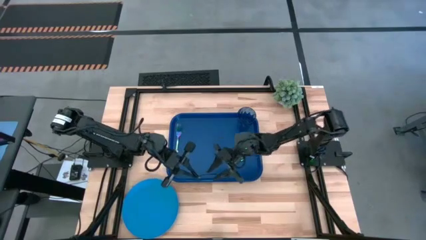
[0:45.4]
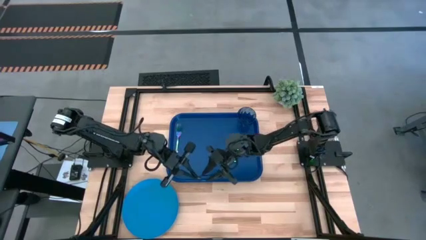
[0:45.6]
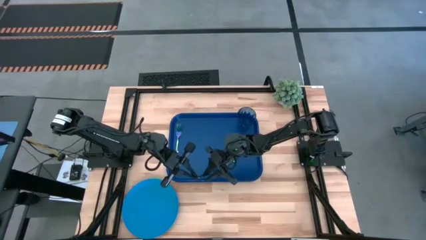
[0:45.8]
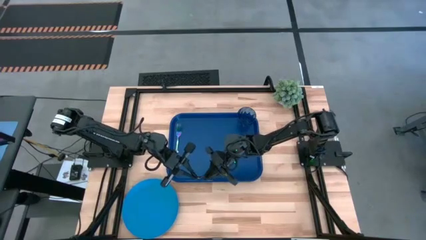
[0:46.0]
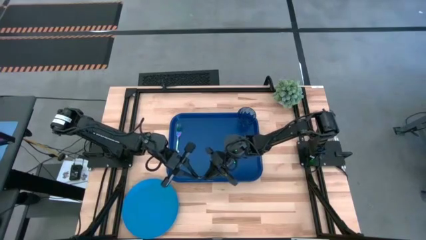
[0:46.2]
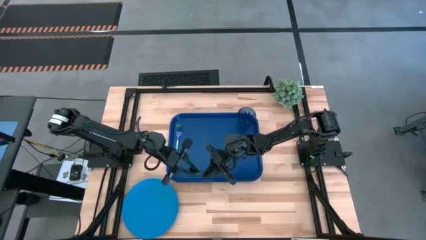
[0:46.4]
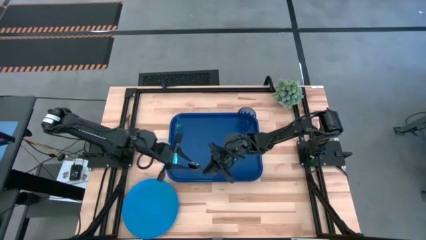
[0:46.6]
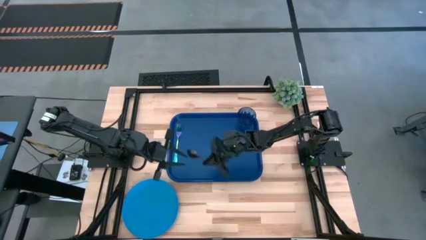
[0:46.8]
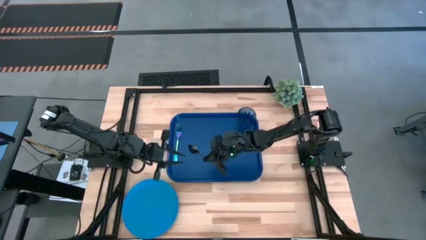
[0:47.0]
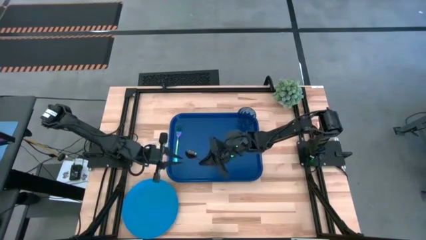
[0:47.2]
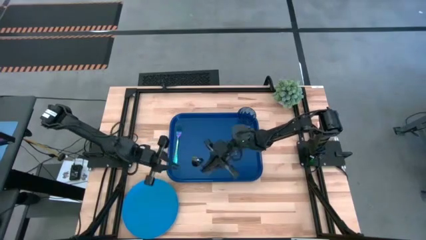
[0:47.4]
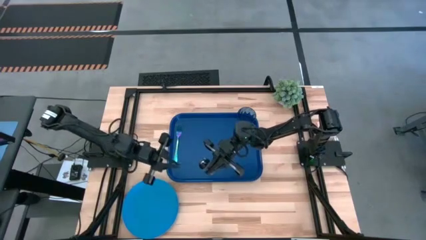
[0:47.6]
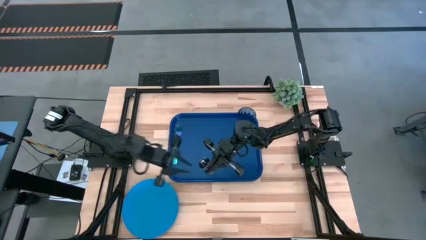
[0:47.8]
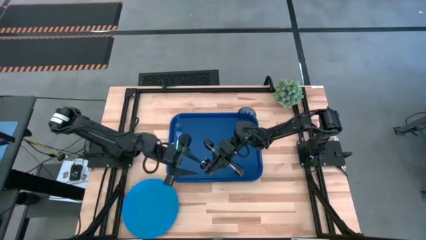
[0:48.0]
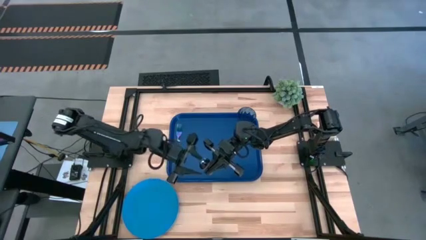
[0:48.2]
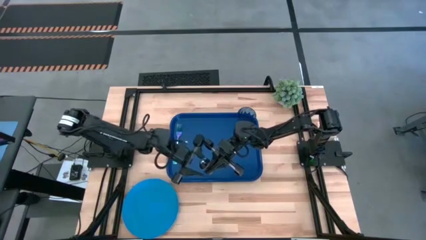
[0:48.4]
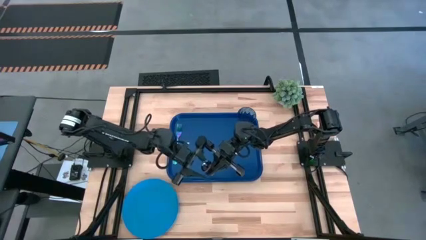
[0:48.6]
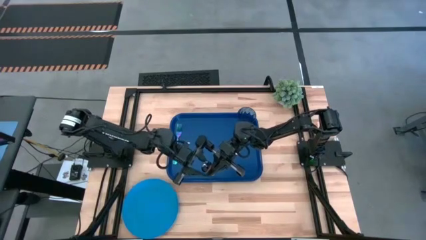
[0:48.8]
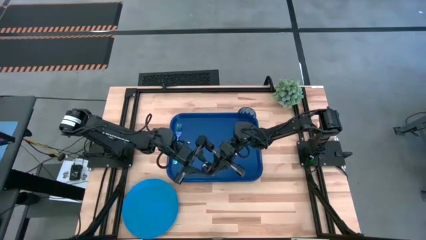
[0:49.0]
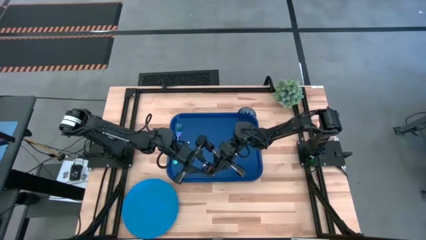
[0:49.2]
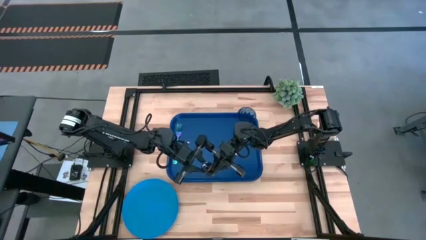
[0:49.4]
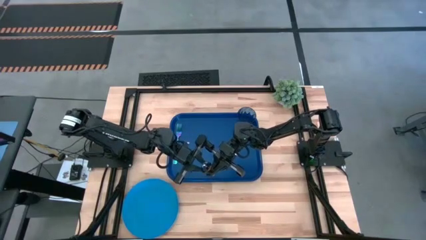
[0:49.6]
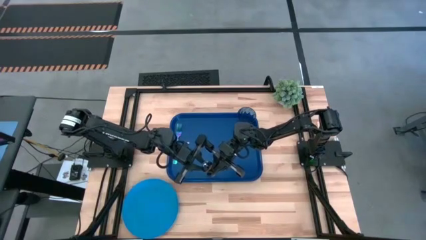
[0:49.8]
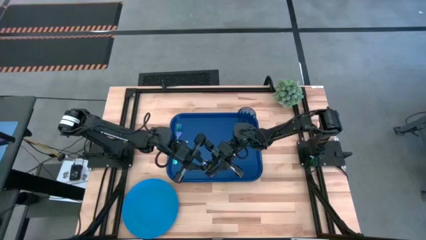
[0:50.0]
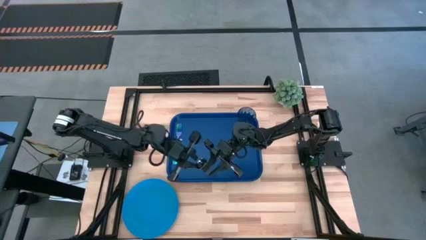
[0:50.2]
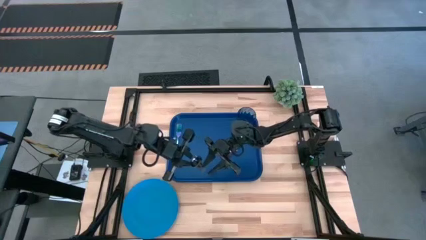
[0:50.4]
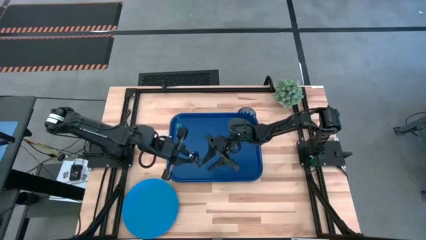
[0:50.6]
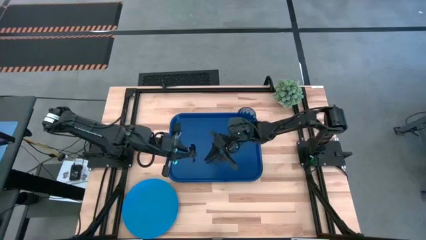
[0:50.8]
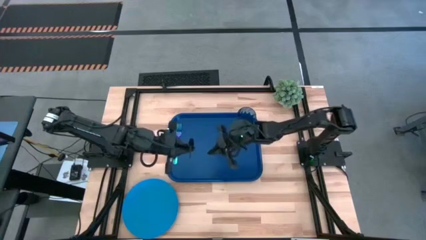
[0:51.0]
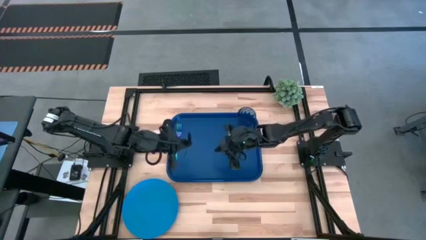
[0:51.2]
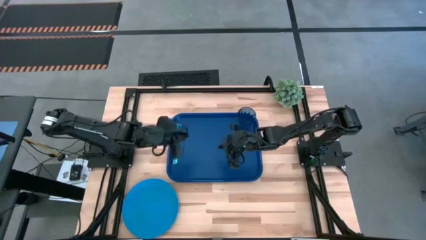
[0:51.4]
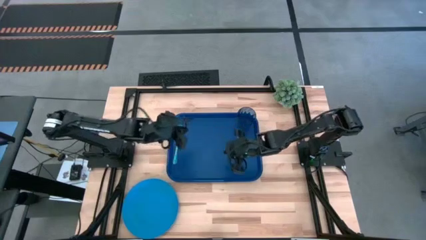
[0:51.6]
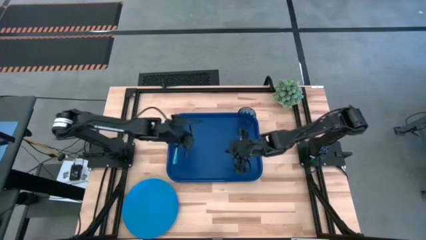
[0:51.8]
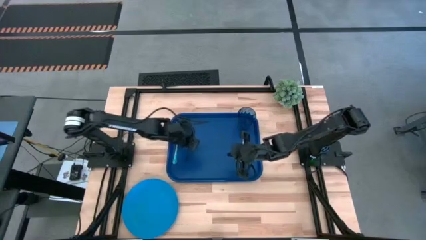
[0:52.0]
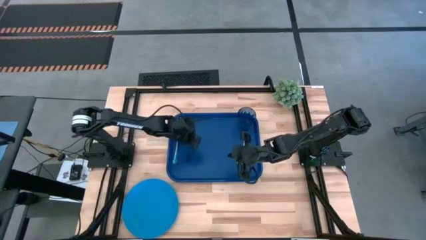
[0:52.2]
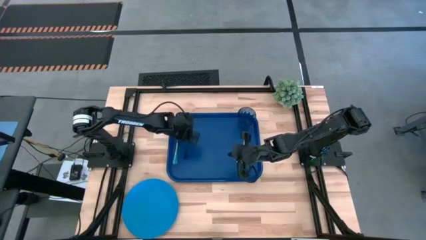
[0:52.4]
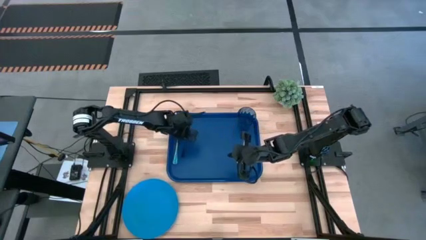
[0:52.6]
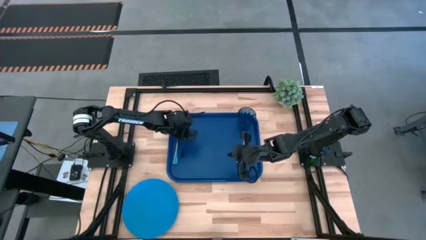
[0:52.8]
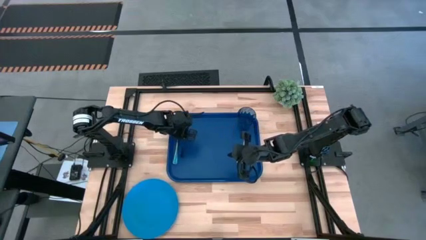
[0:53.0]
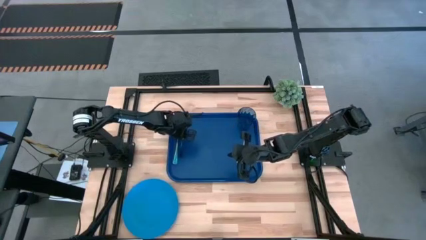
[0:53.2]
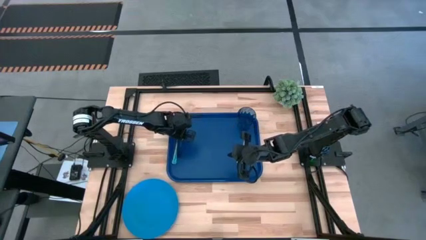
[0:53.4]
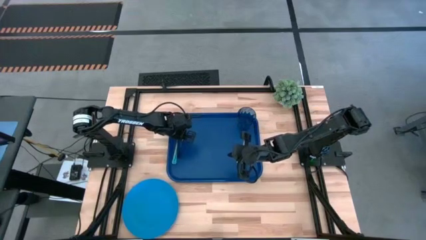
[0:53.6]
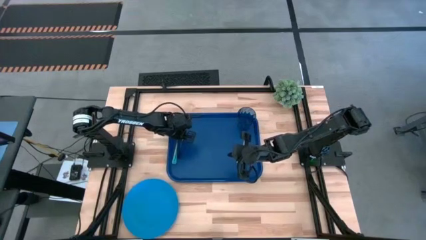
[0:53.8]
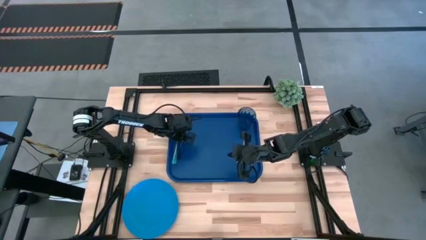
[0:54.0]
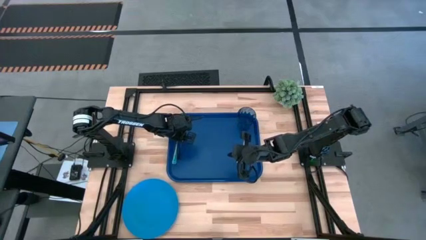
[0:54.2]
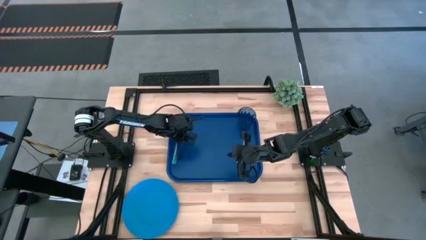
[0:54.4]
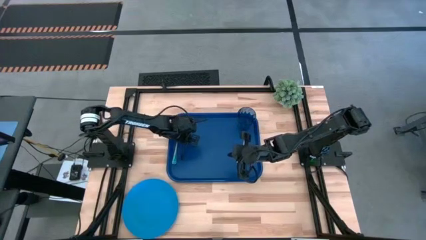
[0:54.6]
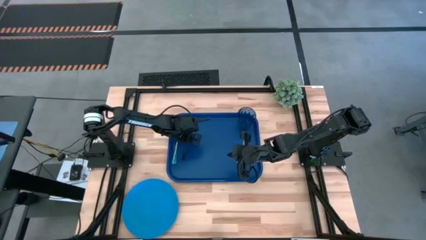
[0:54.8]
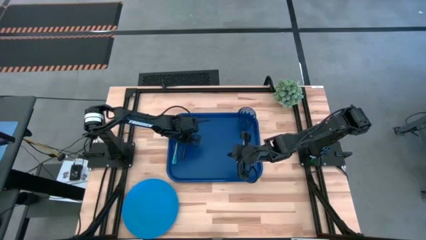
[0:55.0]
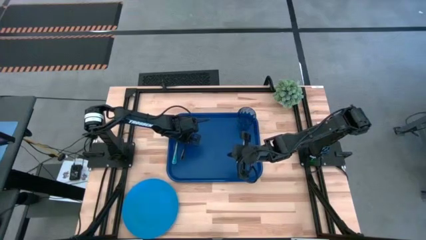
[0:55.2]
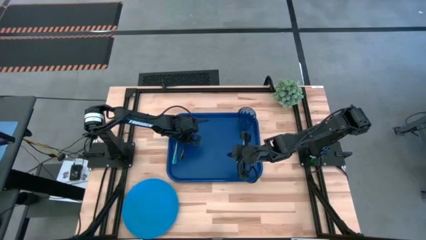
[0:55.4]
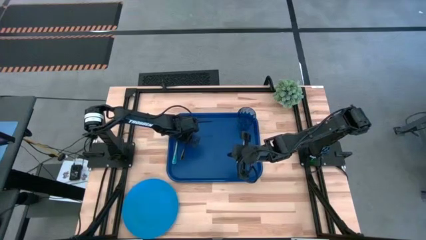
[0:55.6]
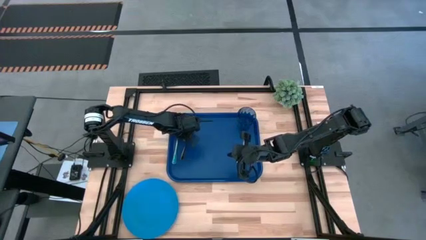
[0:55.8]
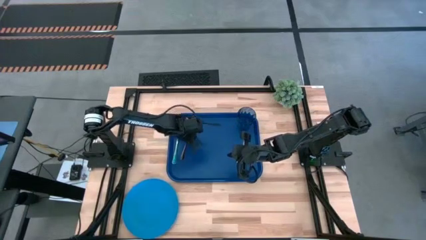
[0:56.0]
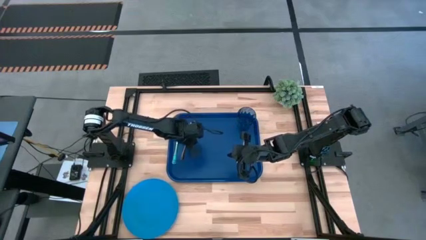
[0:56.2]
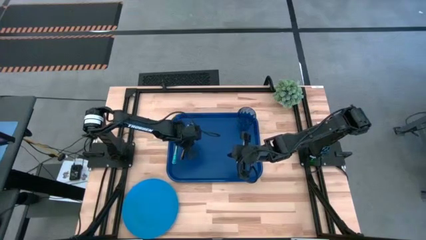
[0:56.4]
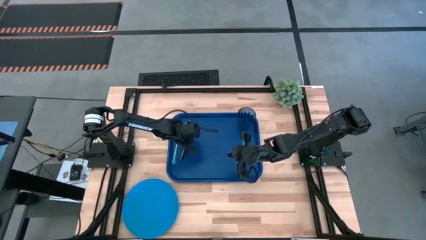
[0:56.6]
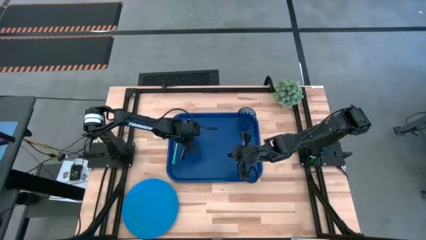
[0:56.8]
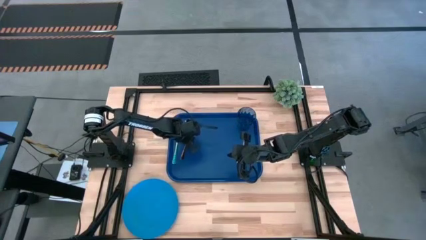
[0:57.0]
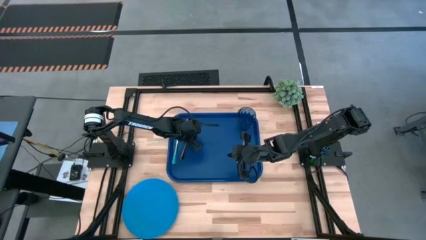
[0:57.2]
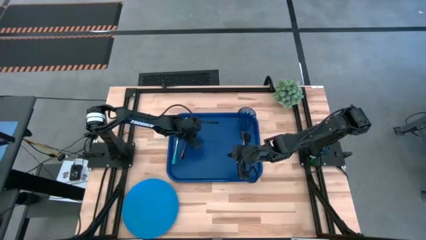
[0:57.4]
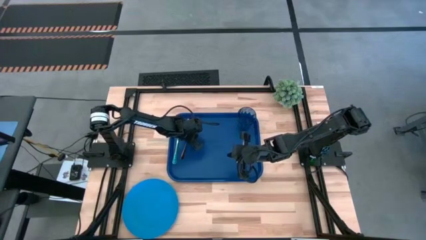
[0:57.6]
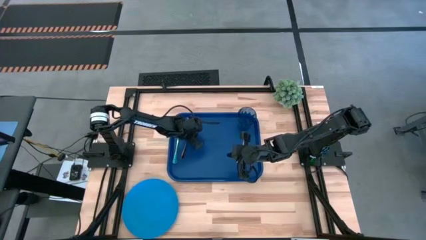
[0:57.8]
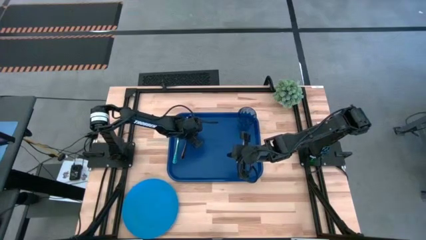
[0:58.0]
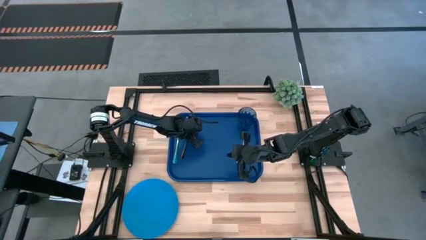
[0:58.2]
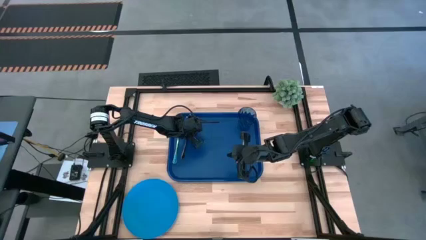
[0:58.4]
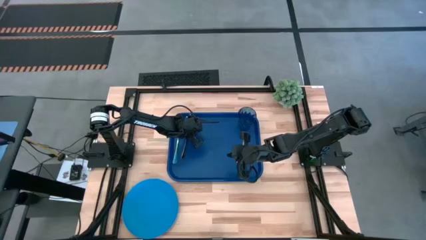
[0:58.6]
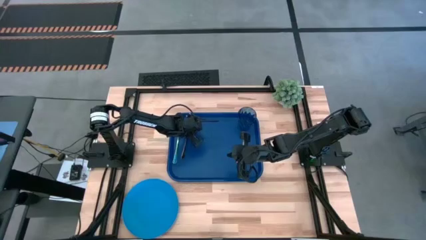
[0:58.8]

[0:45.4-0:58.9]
Task: Pick and place plate/cup/fork/spoon on tray
Put the black spoon on the right side of the fork on the blue tray

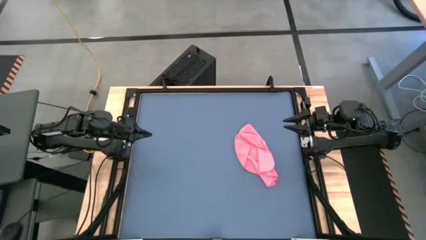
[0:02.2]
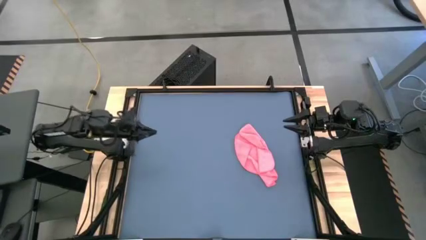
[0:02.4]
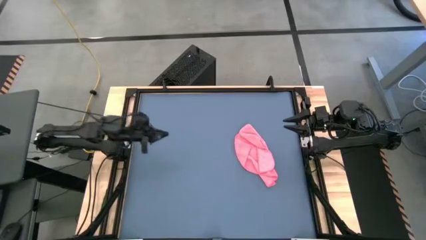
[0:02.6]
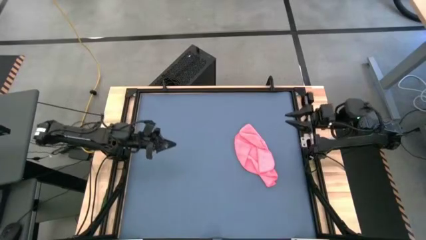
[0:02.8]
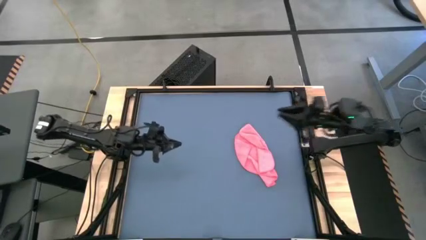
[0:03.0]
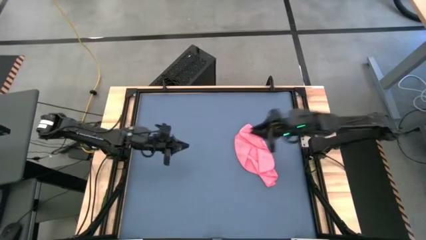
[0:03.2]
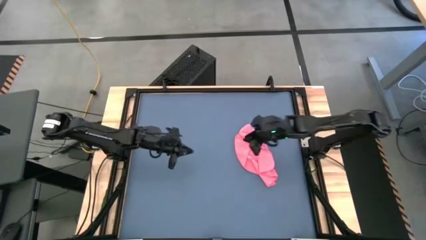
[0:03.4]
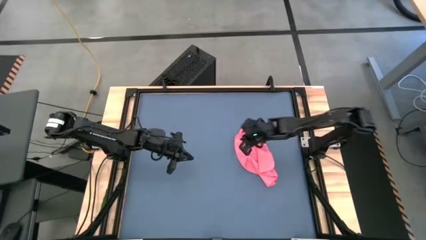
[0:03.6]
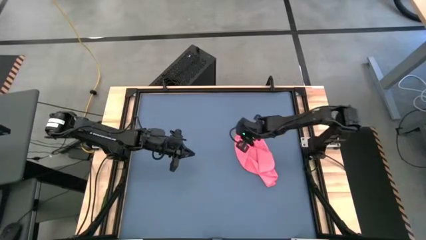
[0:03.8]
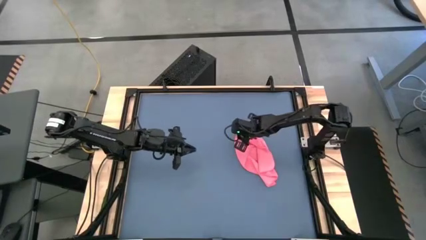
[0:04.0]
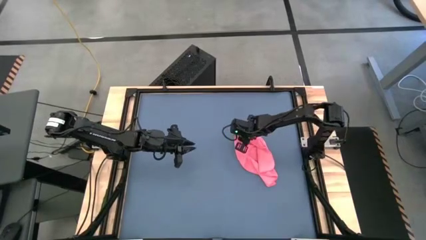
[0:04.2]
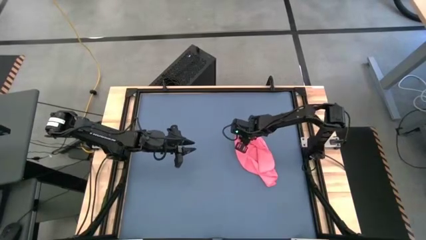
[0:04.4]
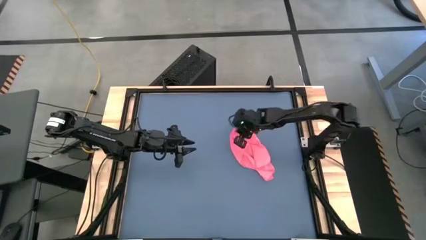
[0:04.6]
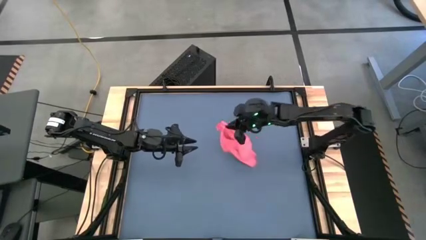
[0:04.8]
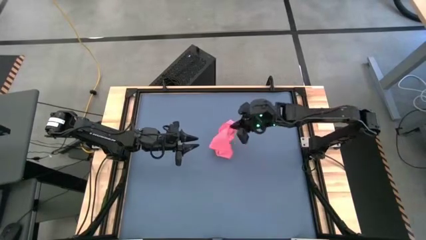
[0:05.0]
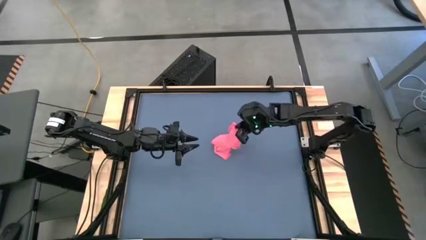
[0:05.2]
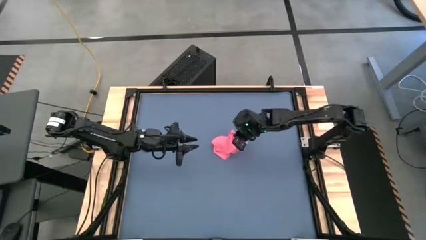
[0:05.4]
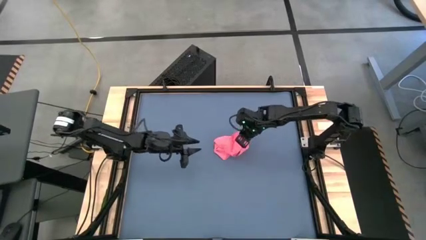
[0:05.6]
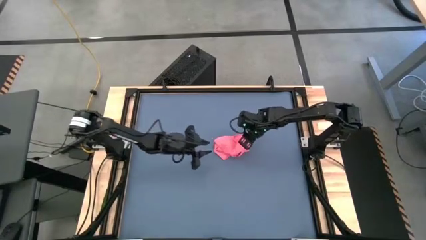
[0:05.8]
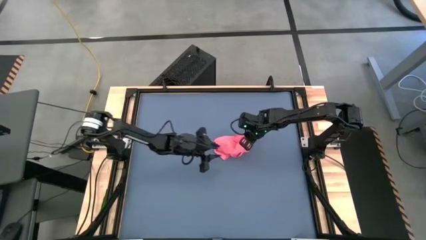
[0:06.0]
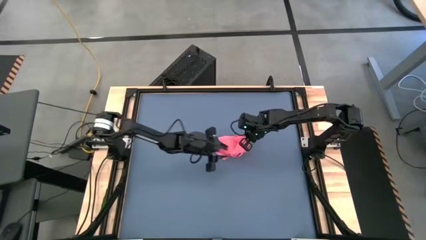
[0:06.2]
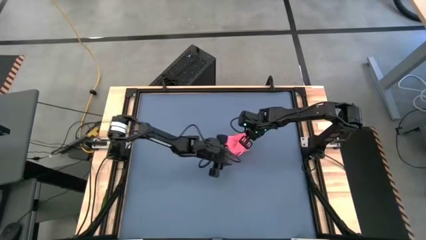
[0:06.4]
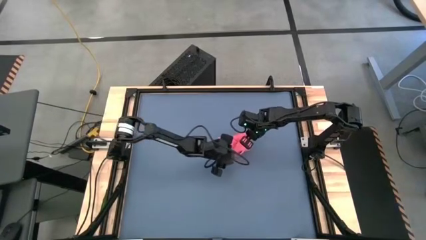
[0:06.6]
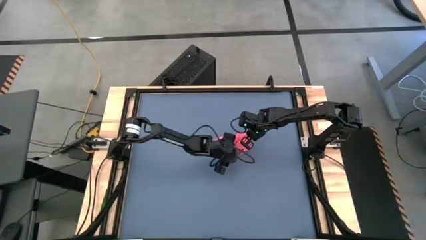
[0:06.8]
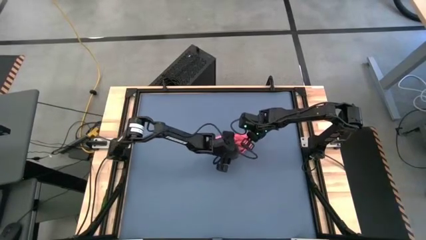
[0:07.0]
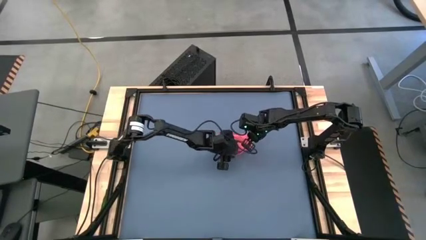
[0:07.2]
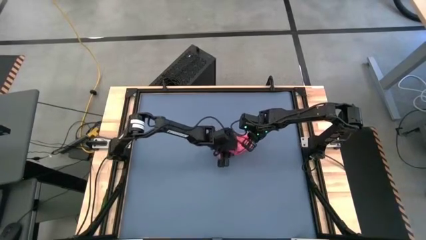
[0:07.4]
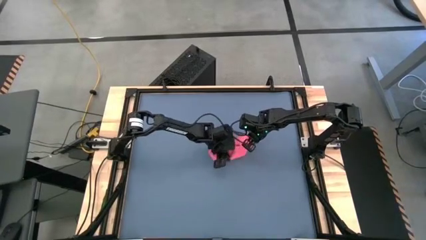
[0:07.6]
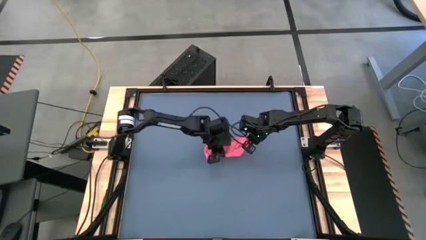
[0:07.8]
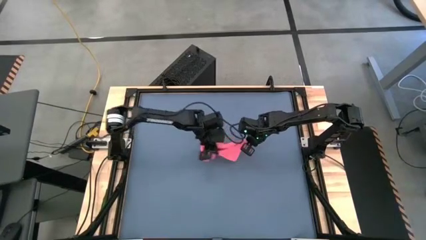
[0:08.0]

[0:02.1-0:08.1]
Task: Roll towel
Fold the pink towel
